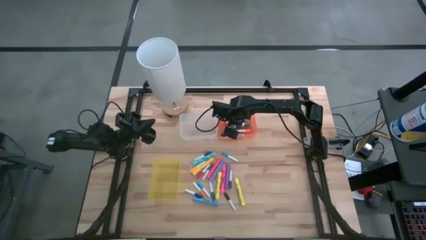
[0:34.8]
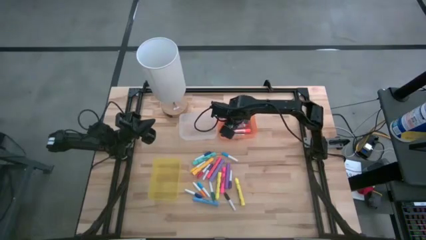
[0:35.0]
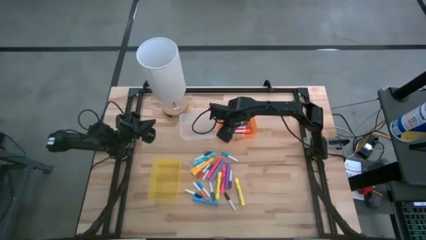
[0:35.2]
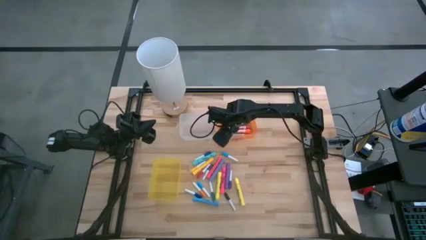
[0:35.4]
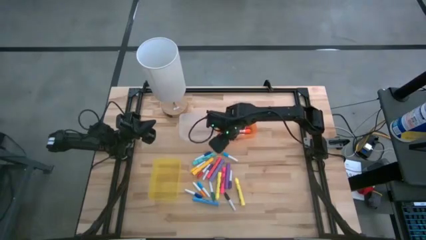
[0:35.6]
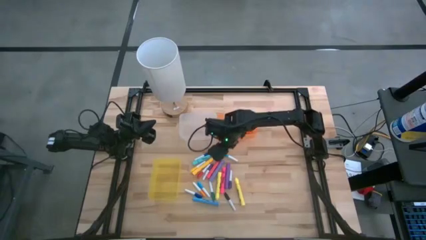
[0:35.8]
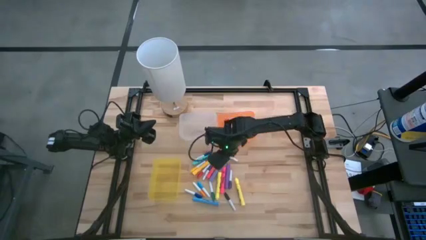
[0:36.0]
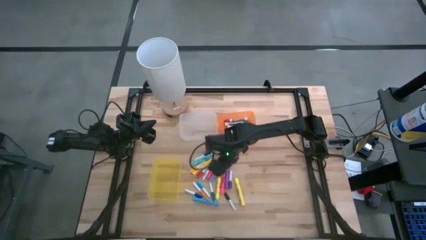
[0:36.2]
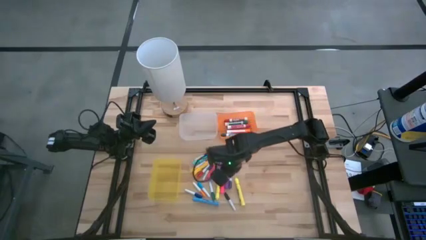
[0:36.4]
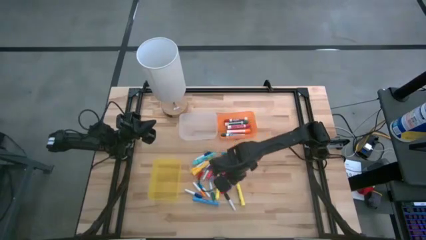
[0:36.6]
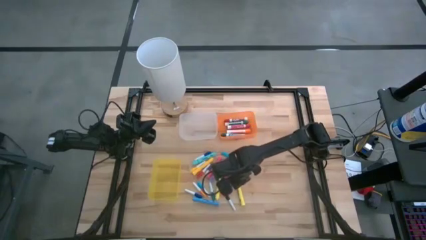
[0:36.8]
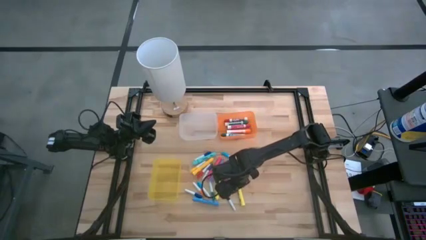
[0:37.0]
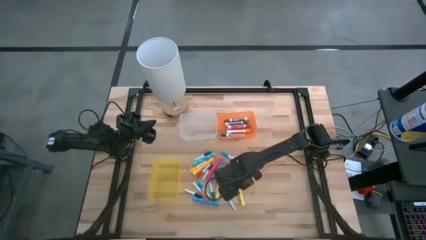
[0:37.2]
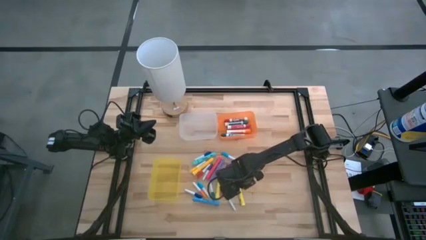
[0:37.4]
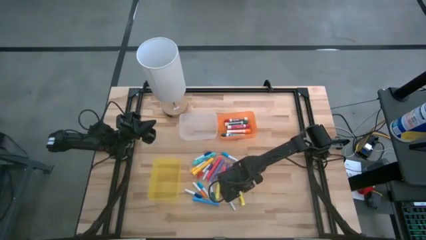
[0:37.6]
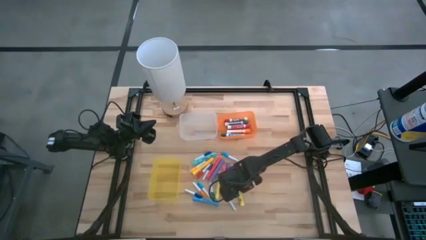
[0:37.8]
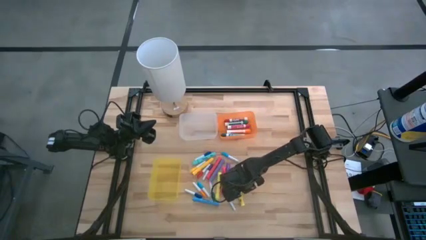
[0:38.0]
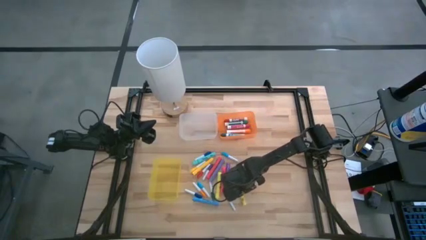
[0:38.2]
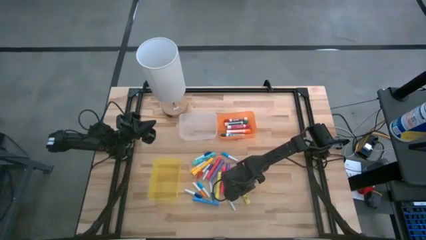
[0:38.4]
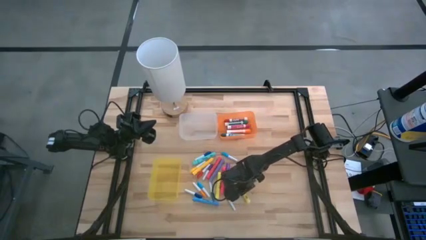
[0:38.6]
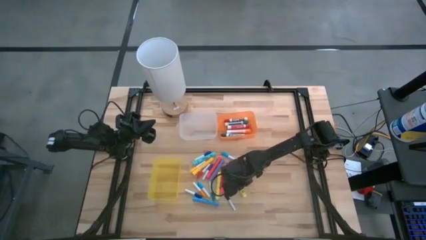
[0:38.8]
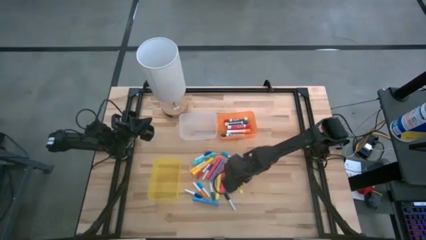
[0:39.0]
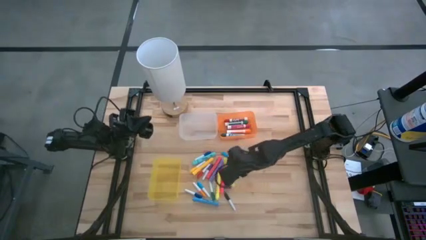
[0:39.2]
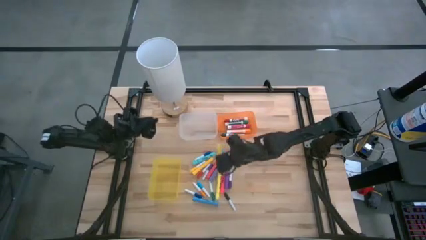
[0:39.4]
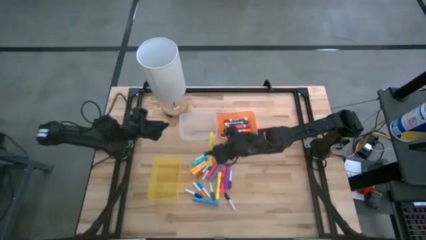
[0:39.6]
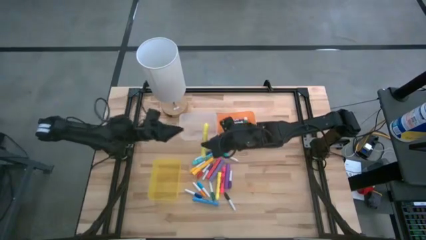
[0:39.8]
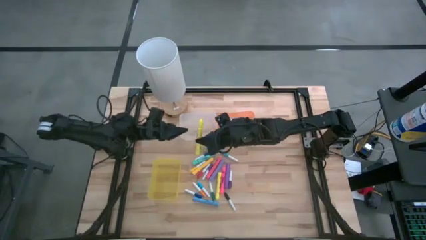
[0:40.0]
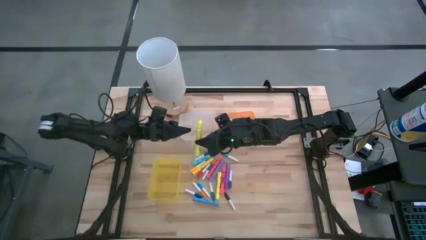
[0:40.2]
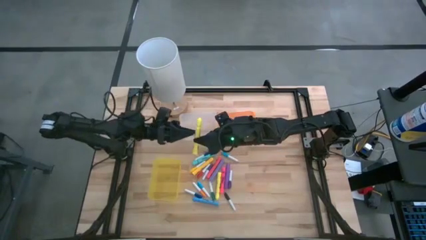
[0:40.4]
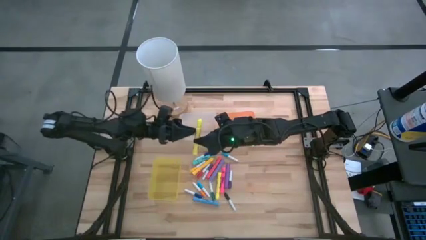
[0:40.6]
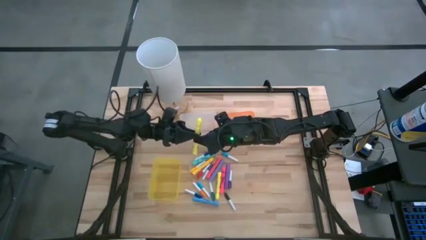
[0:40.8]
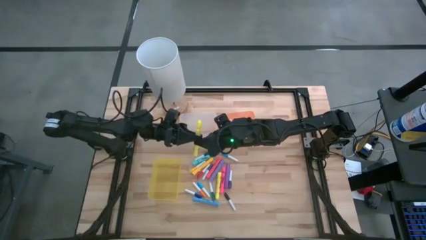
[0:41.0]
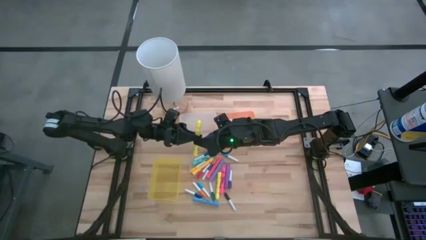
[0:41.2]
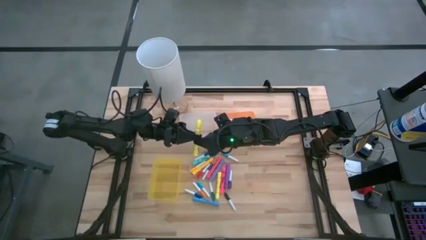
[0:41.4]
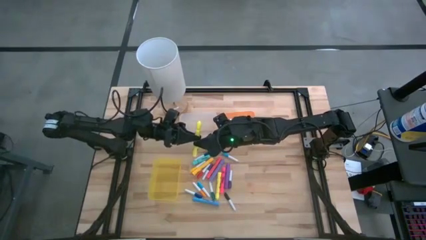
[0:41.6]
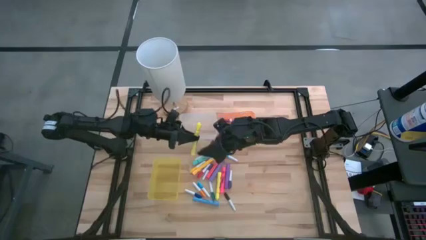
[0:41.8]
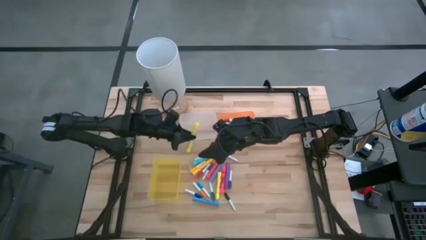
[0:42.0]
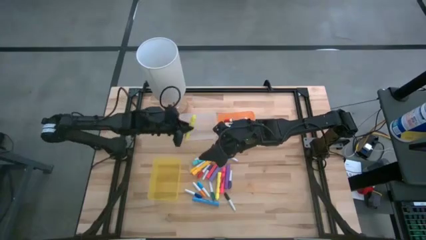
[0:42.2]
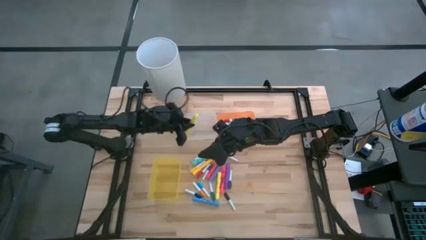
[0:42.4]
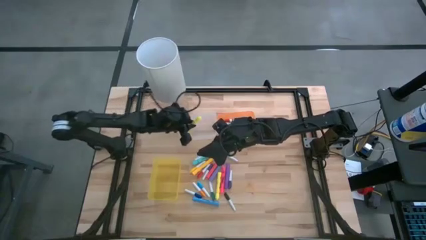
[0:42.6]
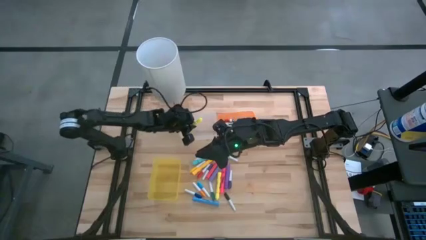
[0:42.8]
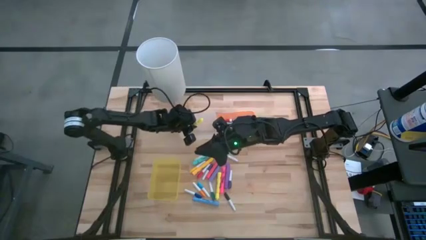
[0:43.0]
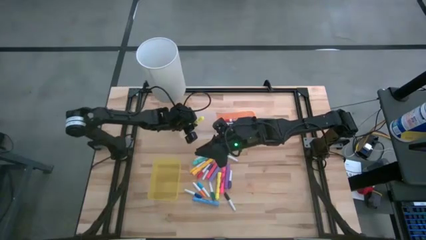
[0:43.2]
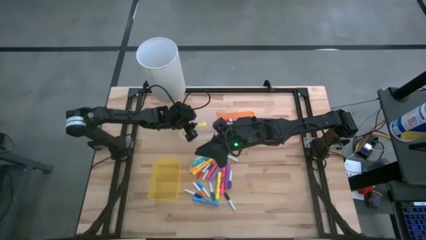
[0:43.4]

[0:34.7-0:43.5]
Task: Pick & Place Markers
Put the bottom right yellow highlighter into the transparent bin

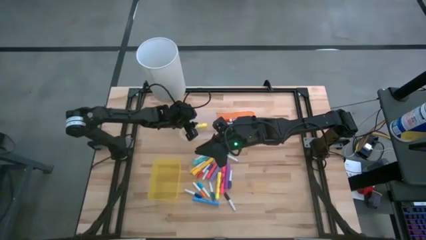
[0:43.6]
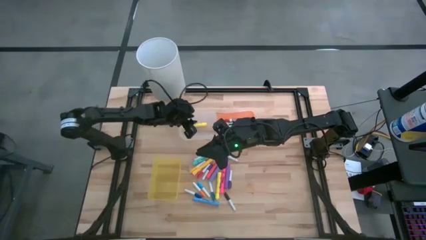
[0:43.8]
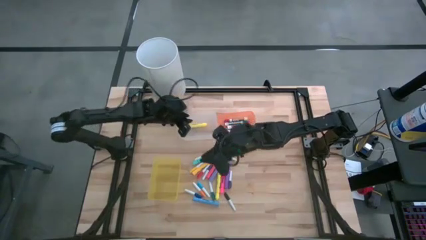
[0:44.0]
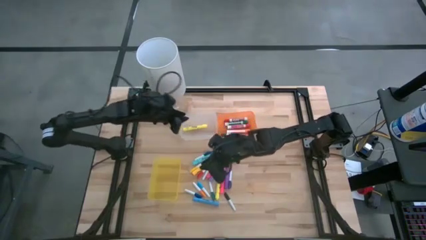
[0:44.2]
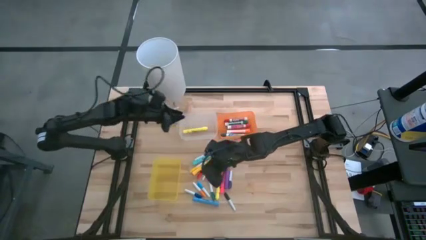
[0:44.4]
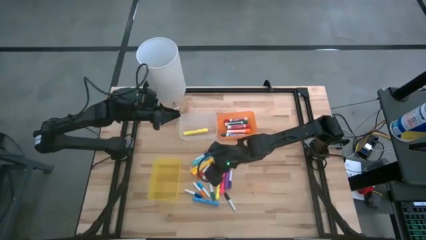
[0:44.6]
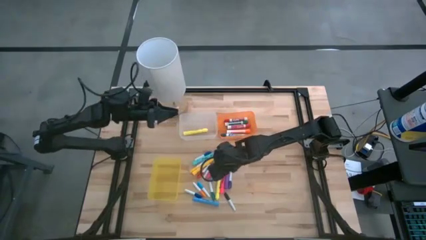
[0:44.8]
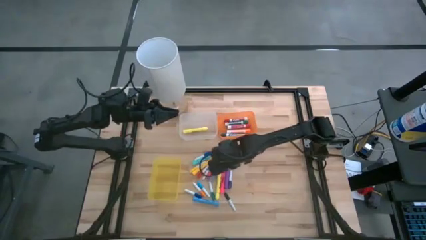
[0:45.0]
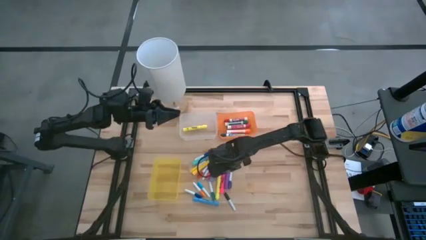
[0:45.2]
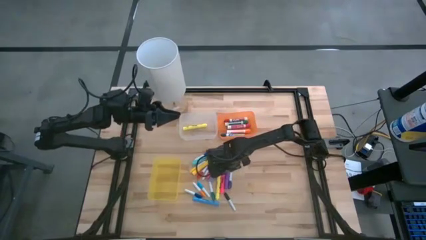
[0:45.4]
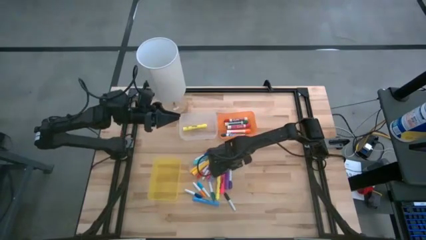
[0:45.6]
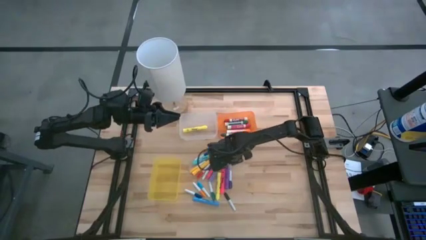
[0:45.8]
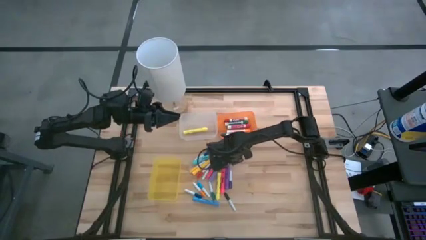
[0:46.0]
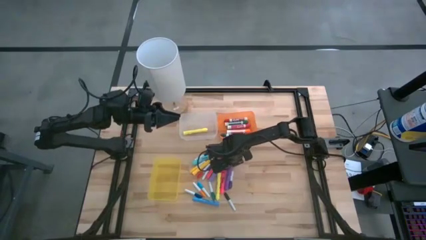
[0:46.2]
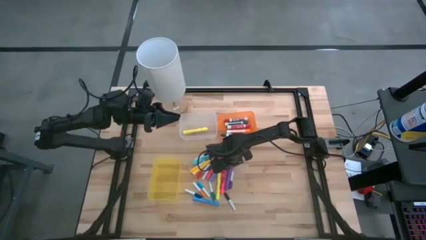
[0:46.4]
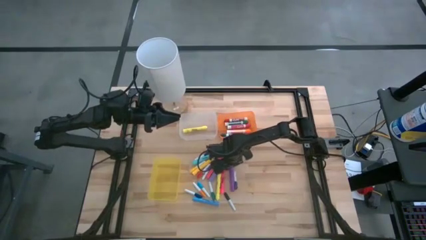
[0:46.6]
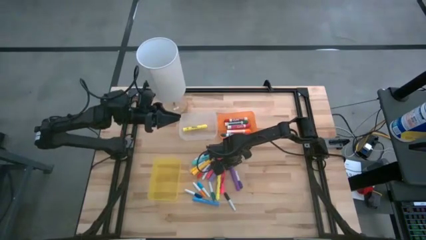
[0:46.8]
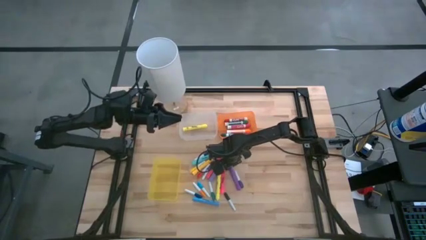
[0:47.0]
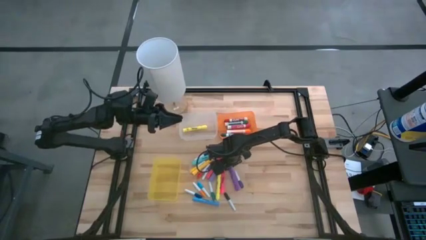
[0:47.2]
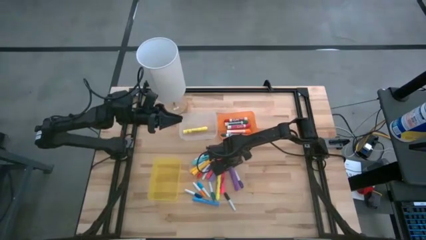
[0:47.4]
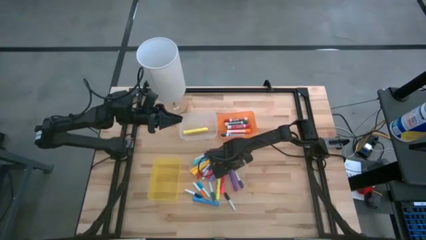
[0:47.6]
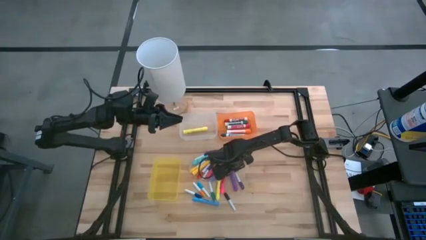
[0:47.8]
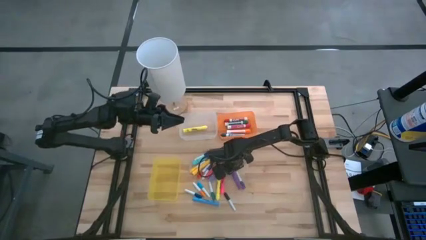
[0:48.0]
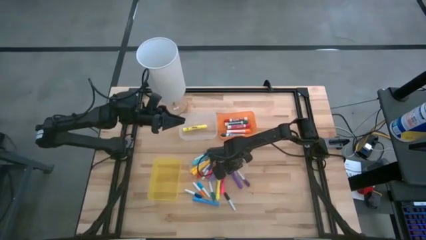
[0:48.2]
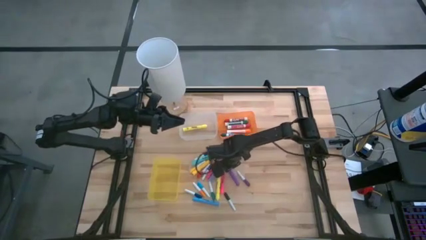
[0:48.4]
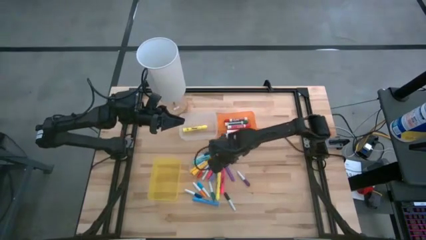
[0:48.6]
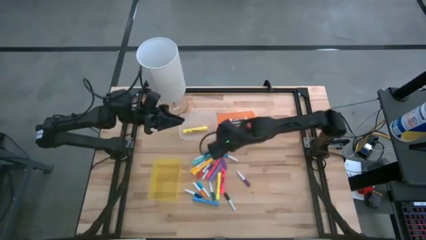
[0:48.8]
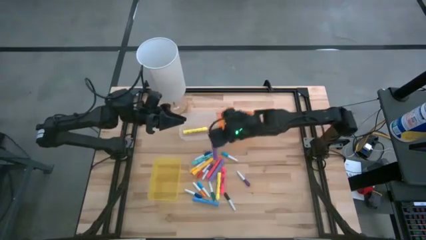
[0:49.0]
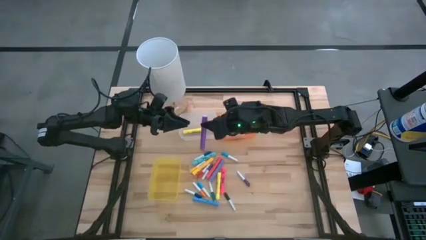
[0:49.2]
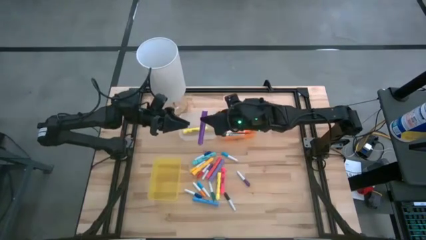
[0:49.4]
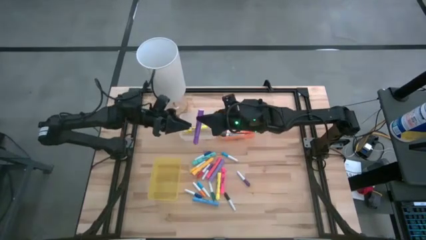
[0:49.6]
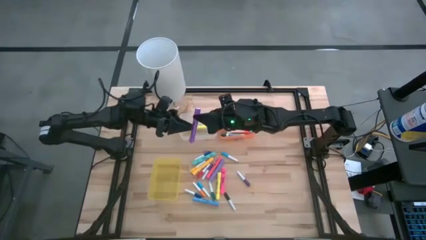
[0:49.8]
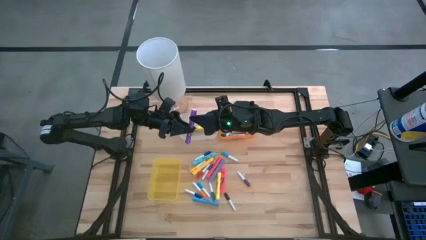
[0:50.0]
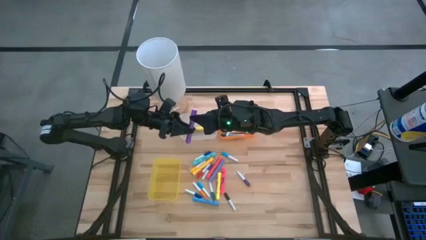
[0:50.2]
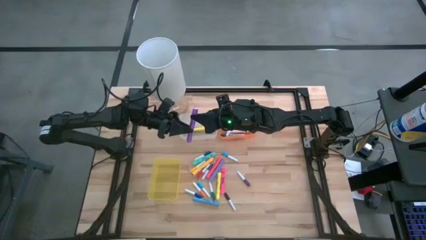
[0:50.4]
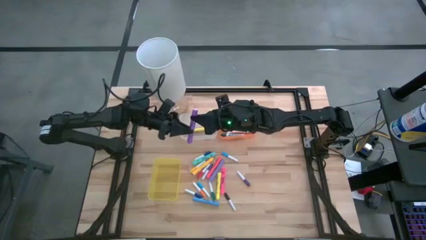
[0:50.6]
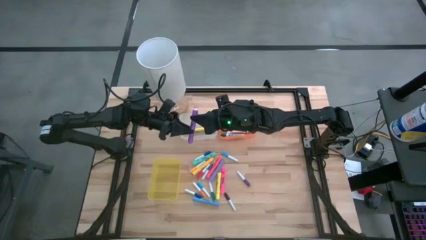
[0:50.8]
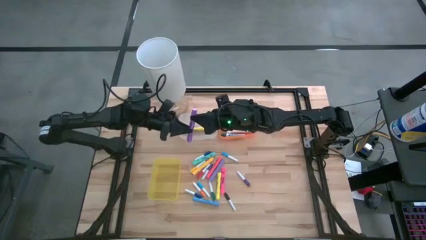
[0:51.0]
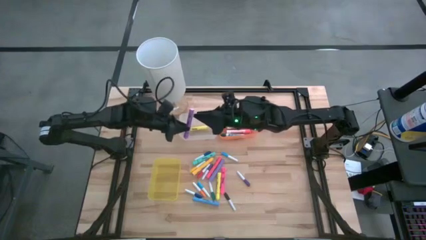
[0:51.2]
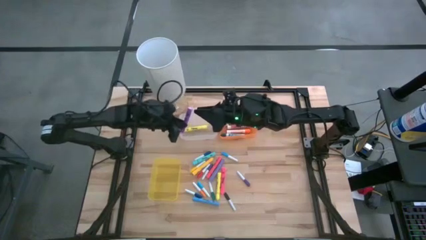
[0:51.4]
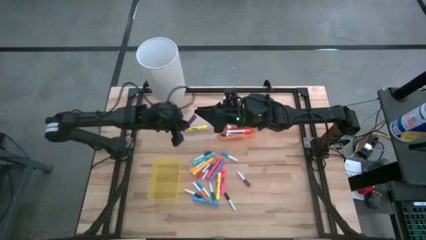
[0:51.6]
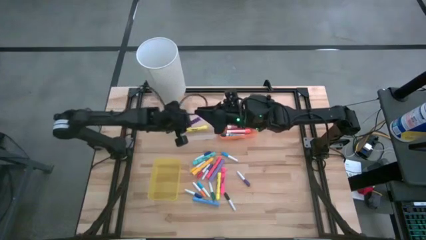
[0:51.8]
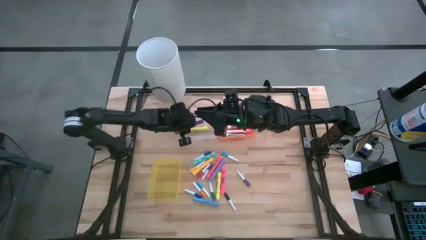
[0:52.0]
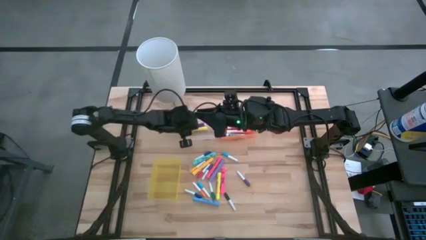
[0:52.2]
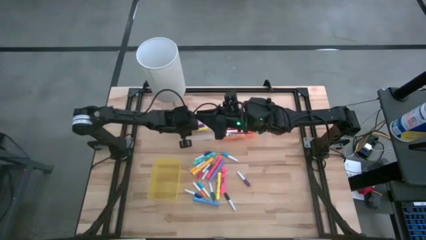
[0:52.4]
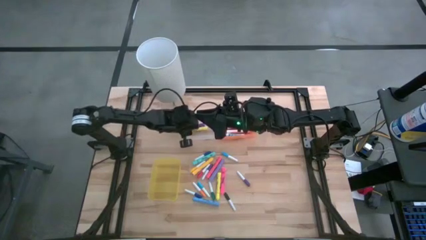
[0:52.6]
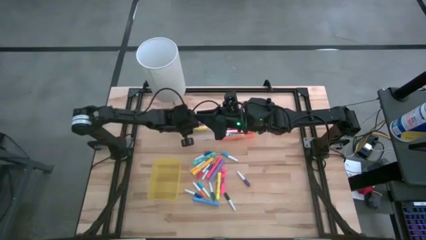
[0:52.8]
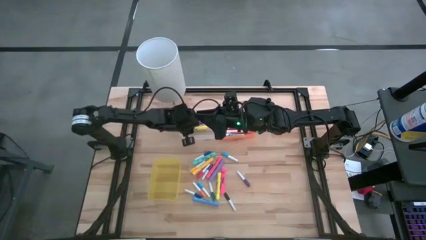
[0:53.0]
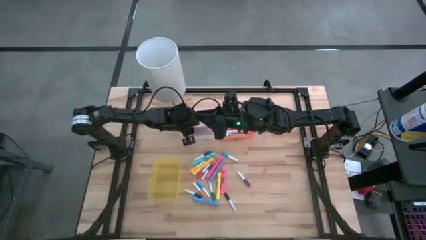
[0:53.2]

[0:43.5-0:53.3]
Put the light purple highlighter into the transparent bin
